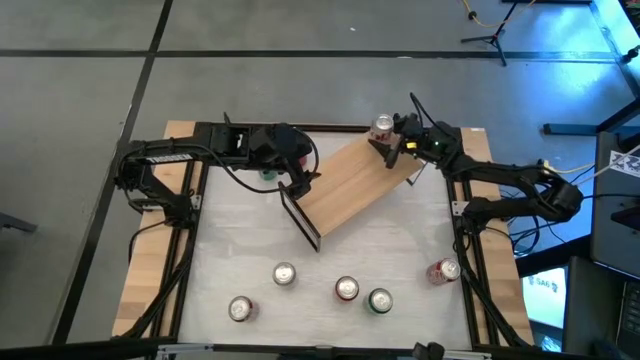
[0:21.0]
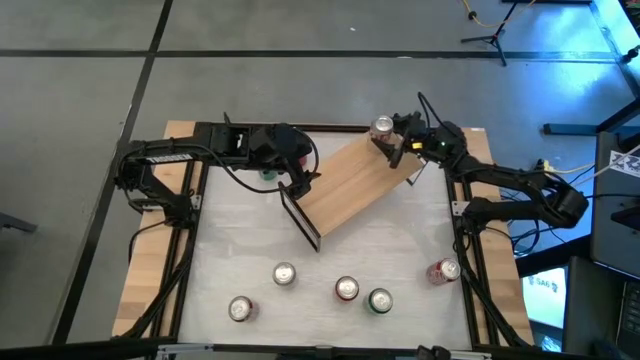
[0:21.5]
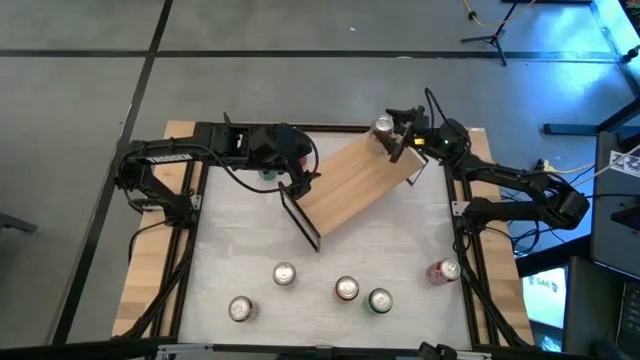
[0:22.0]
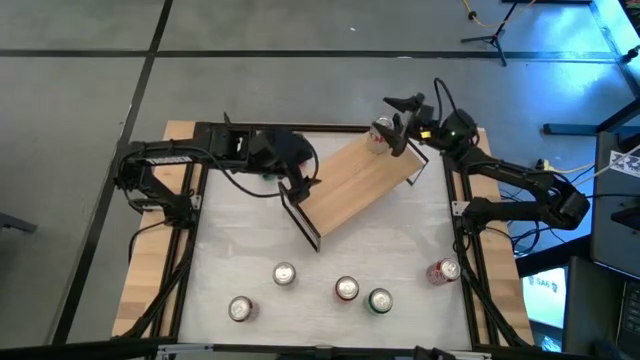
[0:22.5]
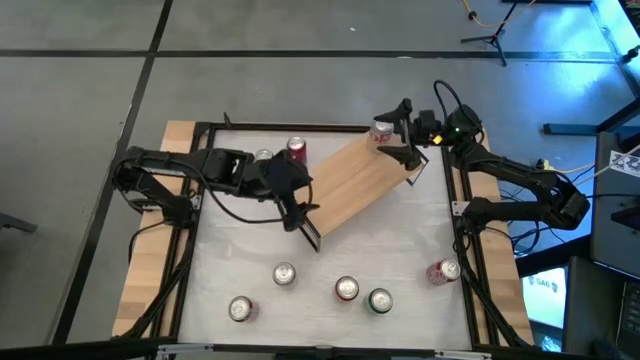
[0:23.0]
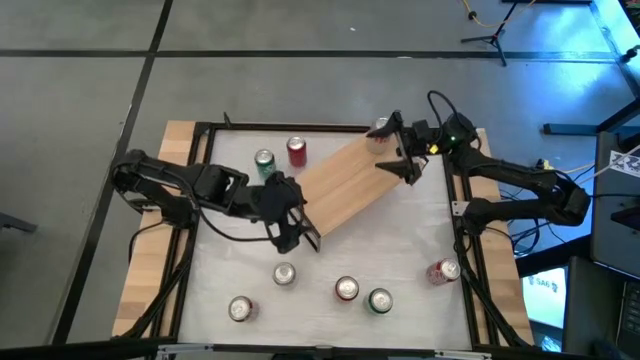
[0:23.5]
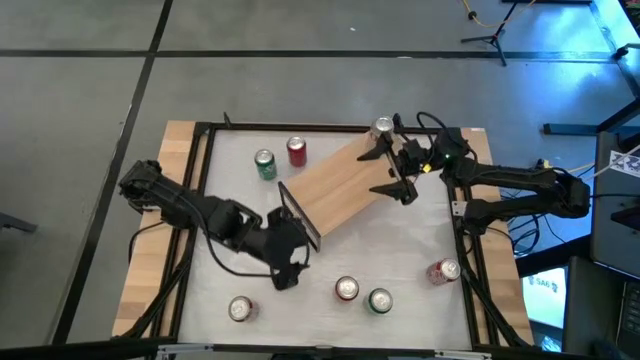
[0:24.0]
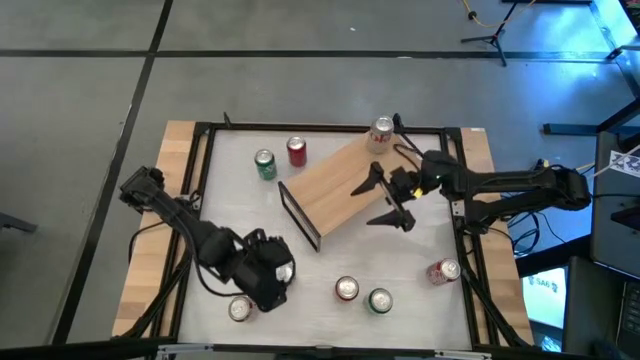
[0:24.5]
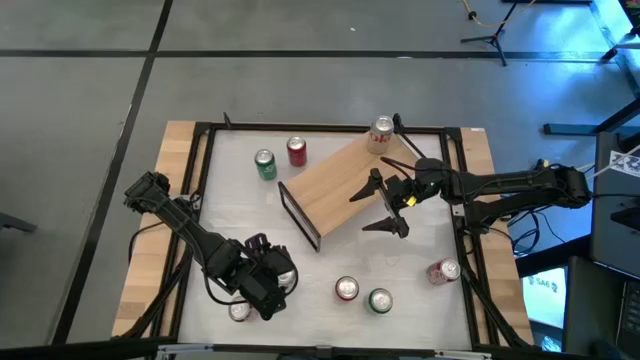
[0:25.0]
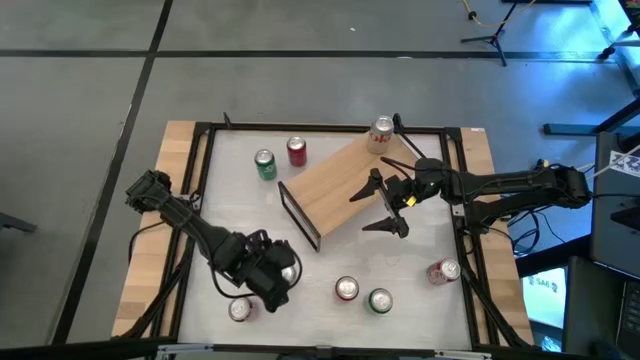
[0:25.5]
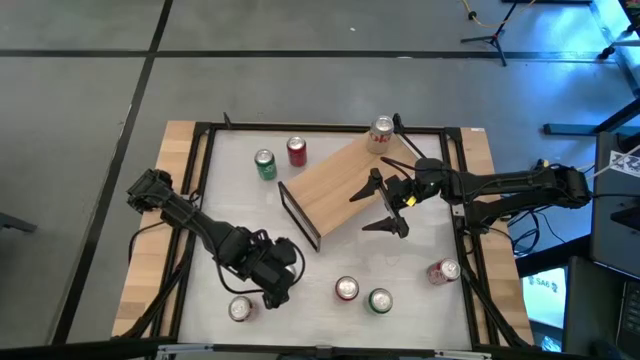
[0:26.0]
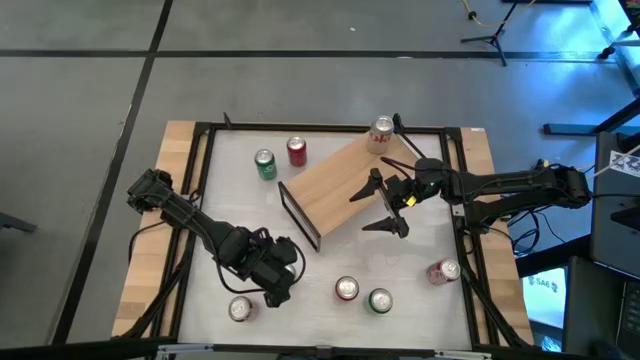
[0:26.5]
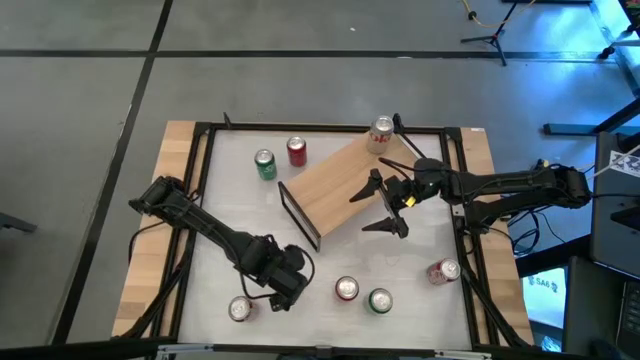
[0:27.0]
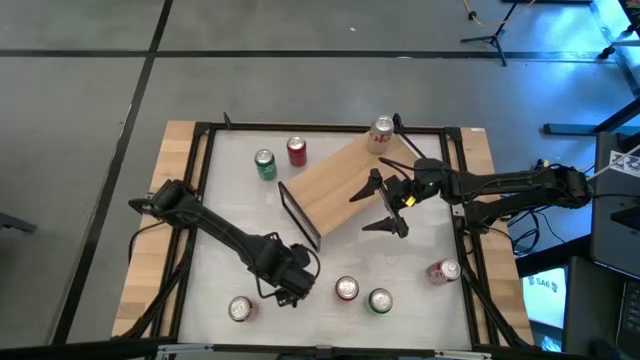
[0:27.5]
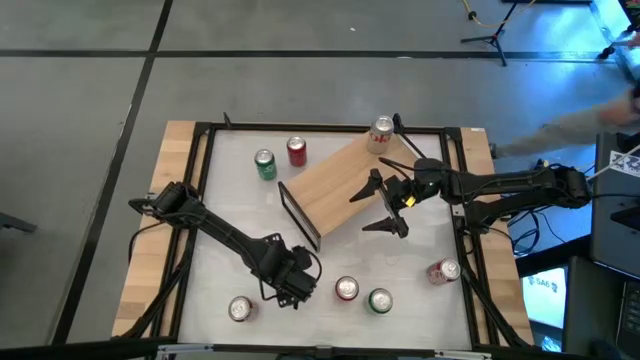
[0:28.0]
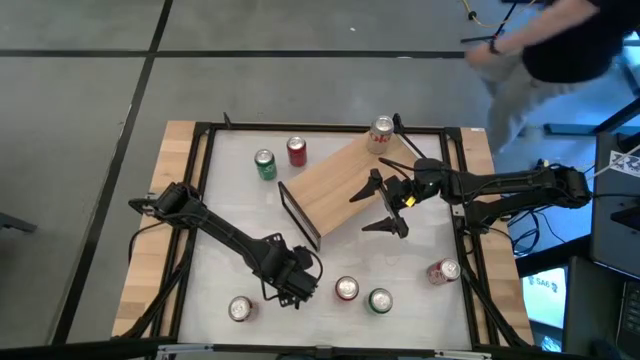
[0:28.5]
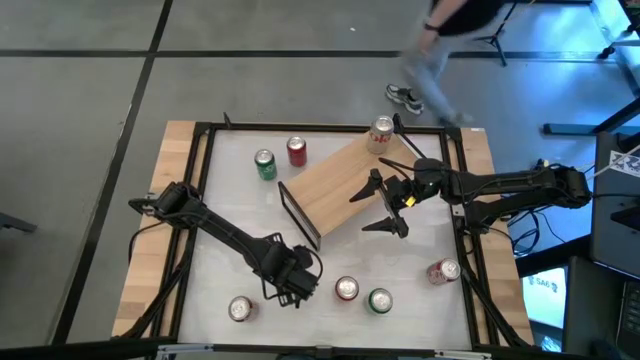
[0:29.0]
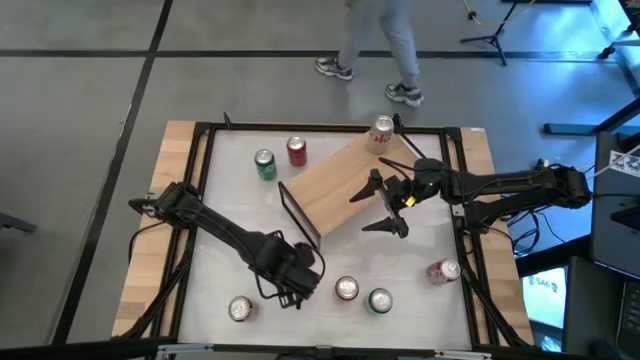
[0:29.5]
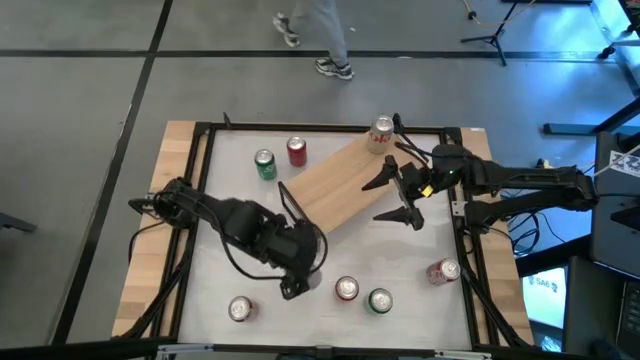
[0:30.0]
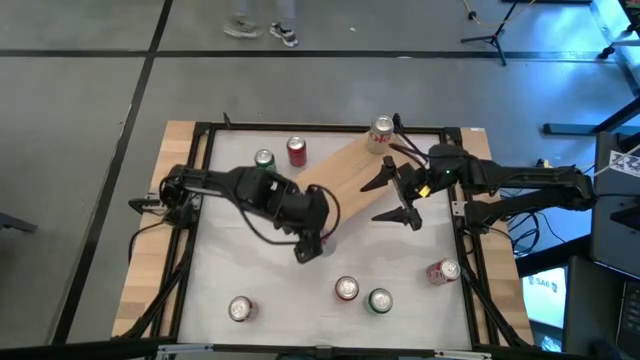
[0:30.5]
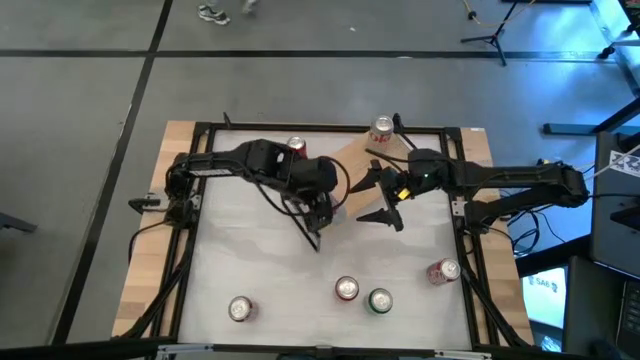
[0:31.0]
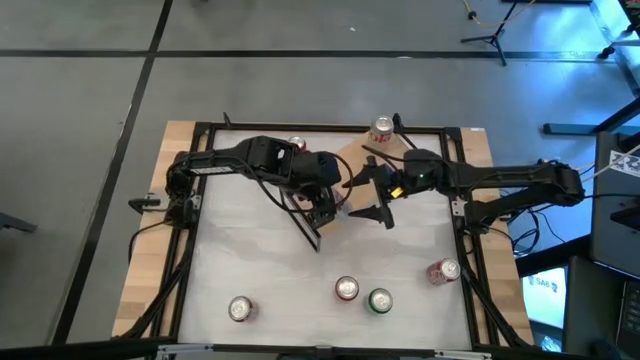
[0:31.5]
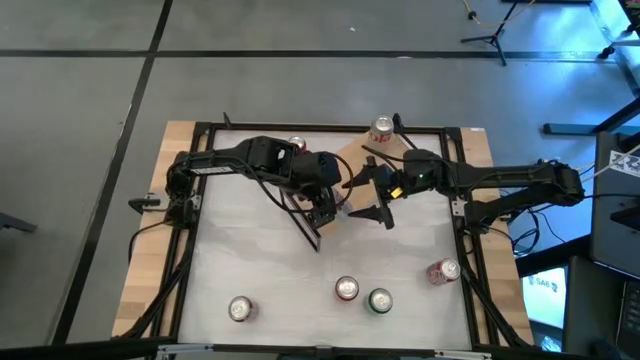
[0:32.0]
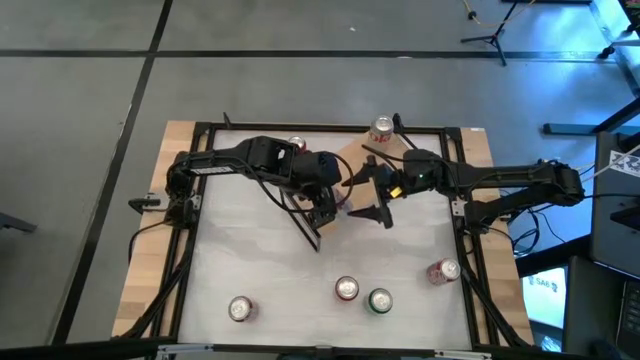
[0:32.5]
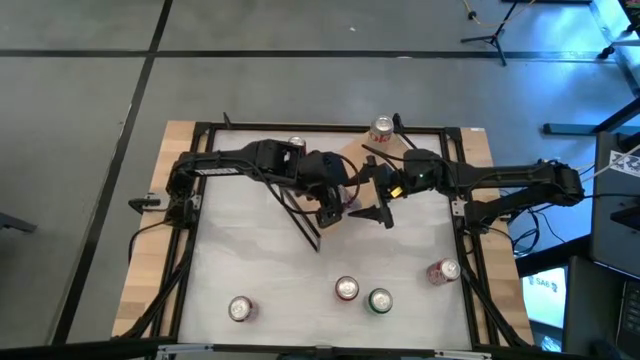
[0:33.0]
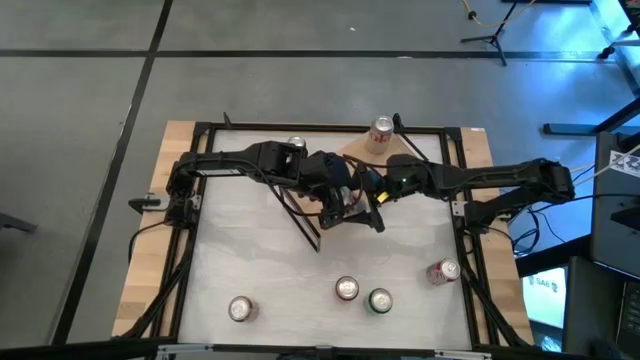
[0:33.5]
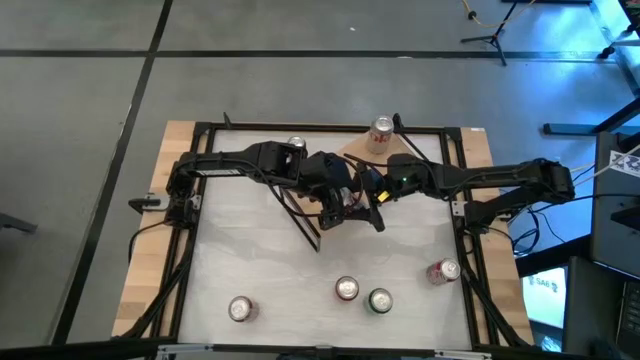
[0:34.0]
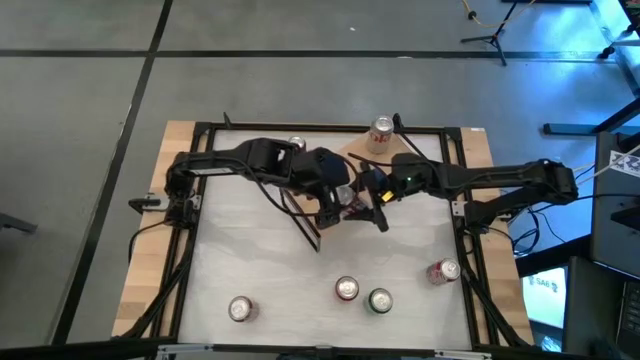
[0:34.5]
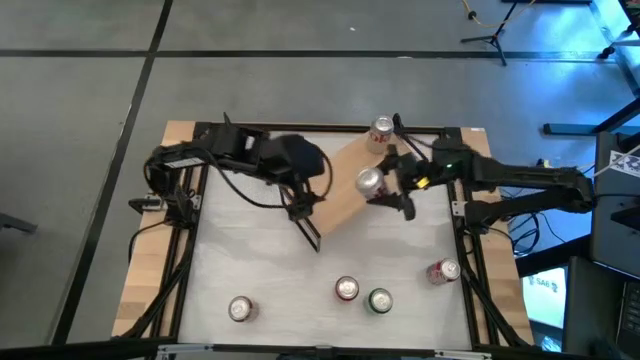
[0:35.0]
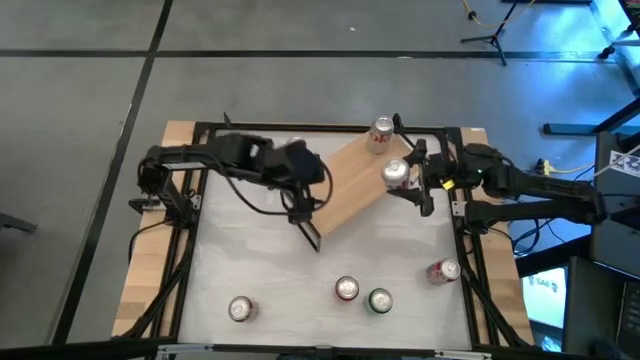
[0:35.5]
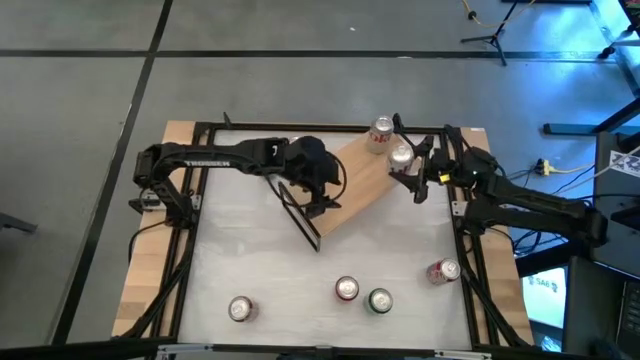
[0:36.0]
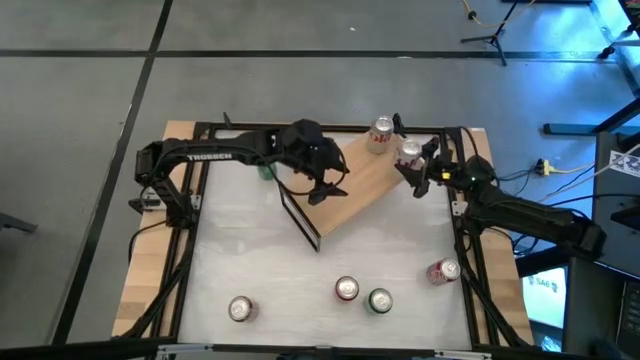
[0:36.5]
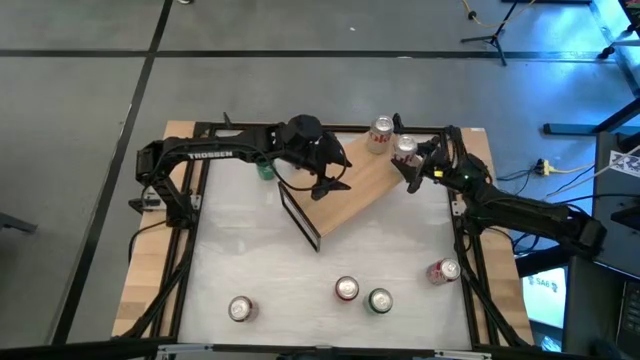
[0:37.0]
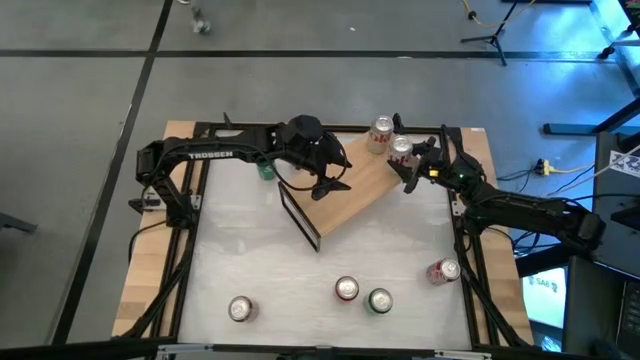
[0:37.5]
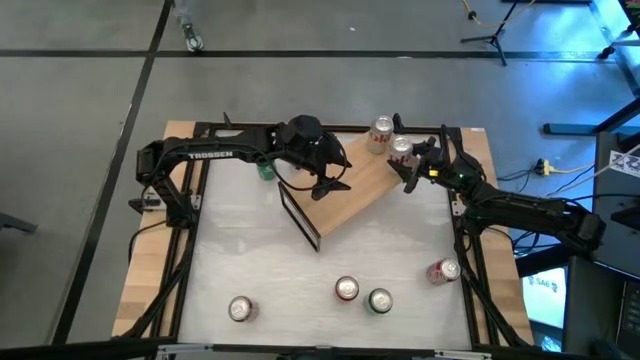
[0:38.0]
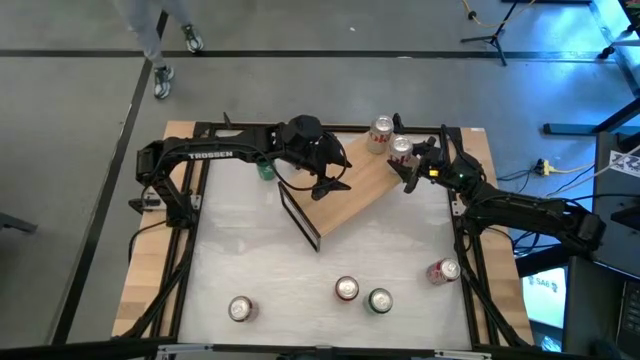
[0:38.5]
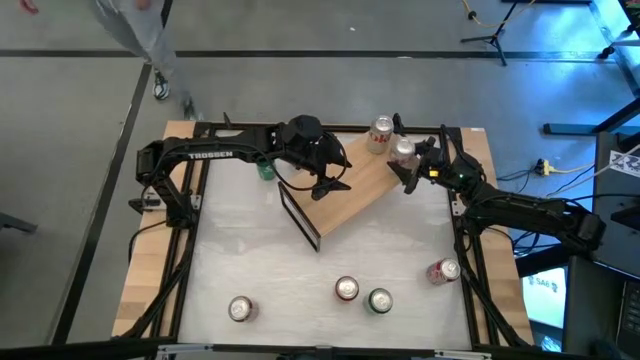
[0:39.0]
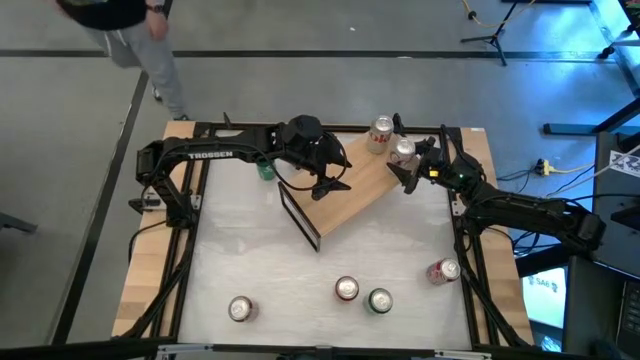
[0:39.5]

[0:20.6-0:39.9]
Task: Place canned beverage on shelf
Put the silver soda can on the shelf aligned with the other silver soda can
